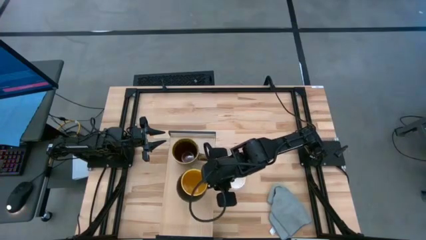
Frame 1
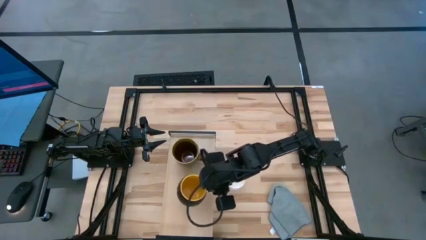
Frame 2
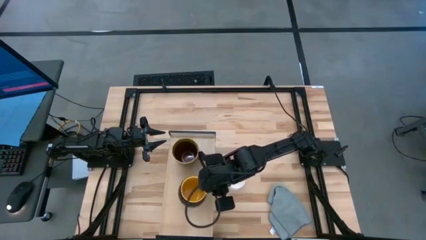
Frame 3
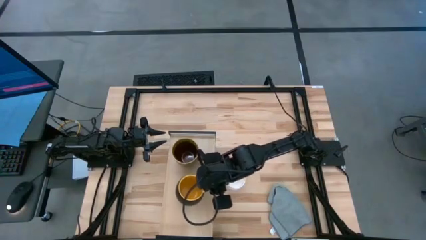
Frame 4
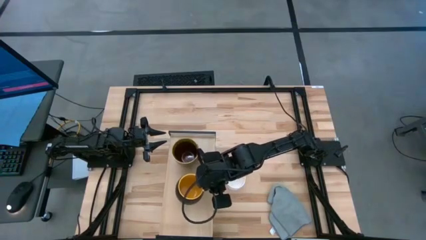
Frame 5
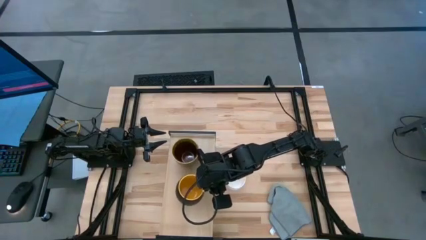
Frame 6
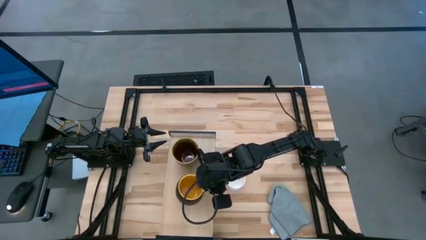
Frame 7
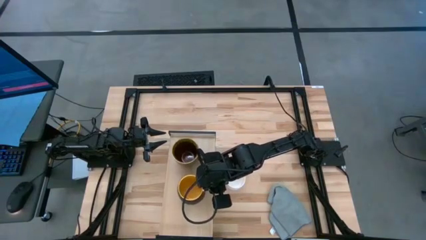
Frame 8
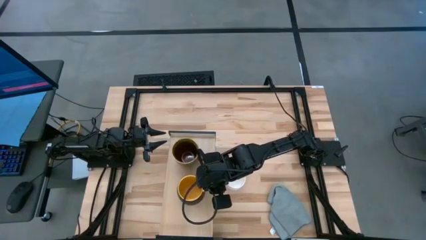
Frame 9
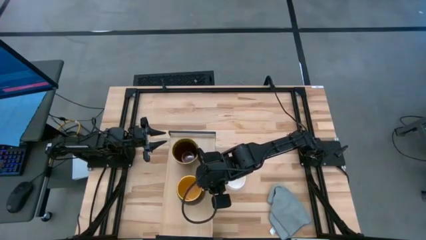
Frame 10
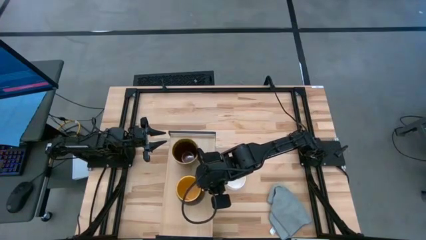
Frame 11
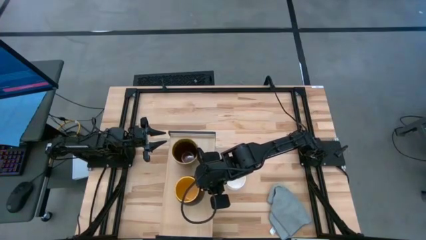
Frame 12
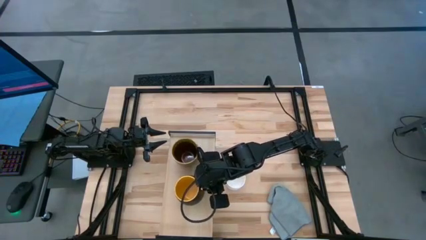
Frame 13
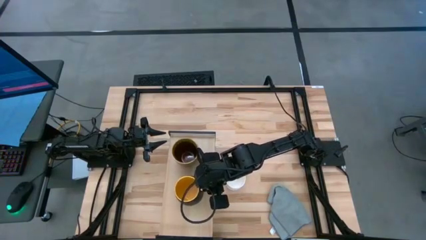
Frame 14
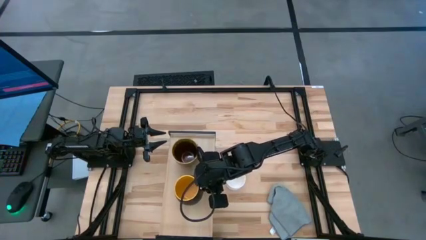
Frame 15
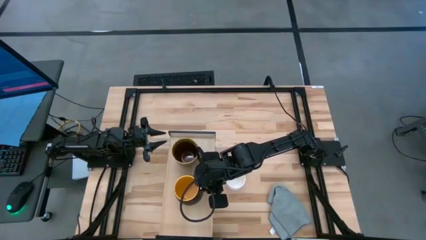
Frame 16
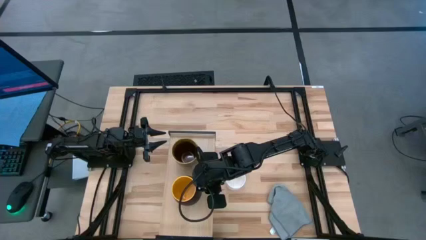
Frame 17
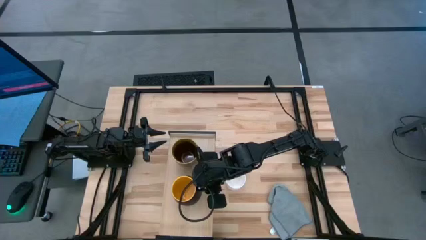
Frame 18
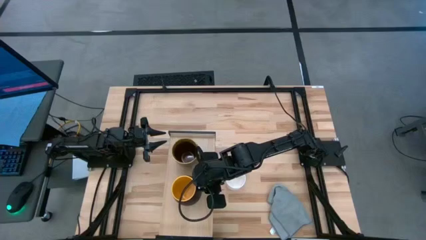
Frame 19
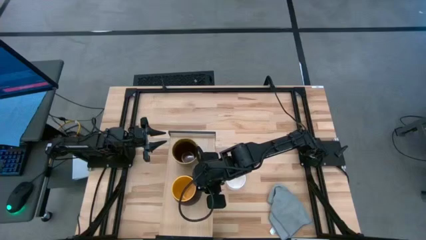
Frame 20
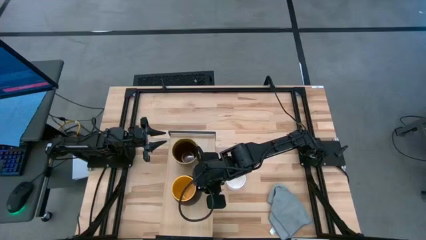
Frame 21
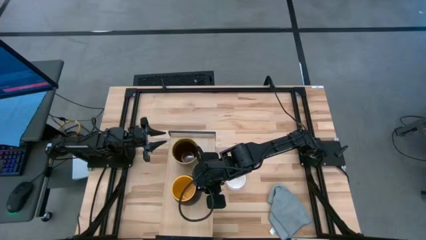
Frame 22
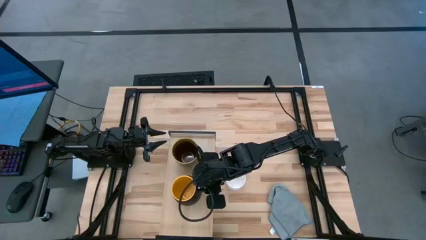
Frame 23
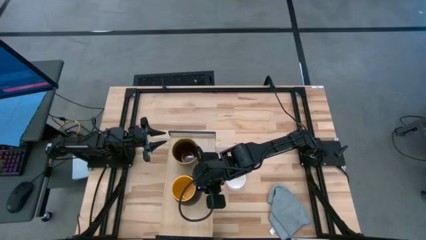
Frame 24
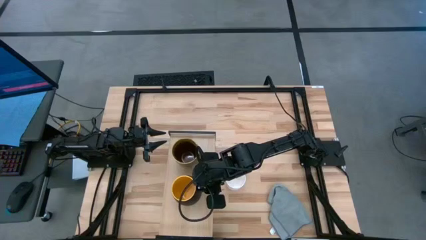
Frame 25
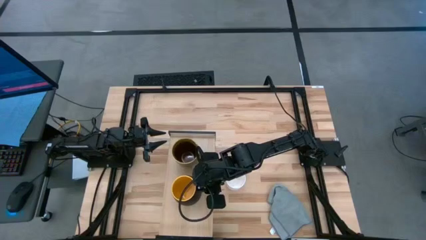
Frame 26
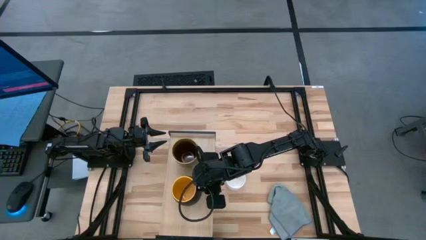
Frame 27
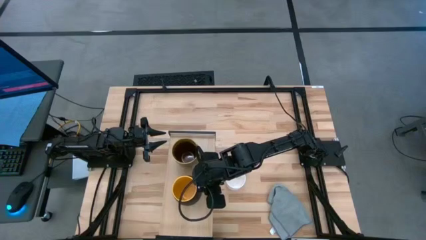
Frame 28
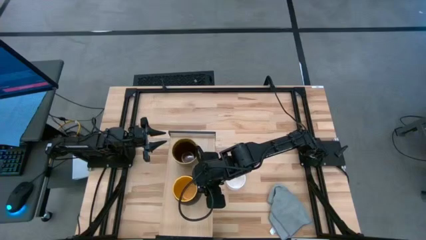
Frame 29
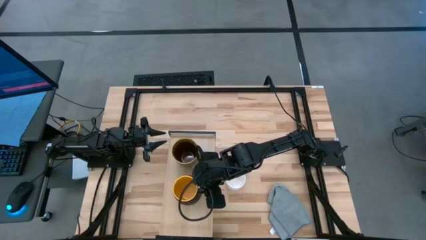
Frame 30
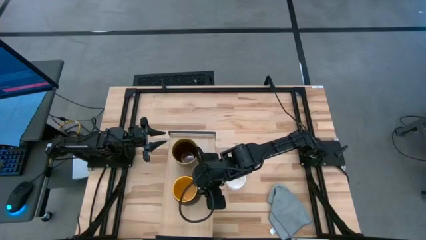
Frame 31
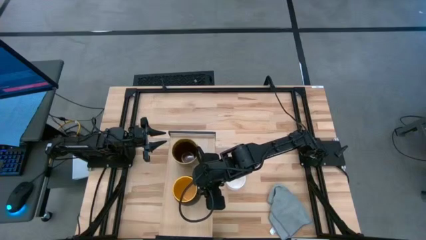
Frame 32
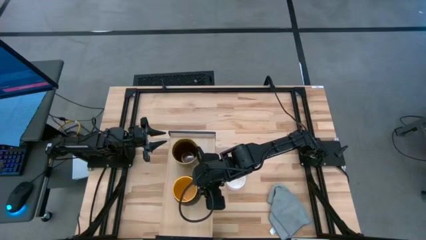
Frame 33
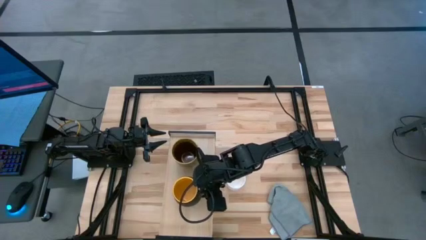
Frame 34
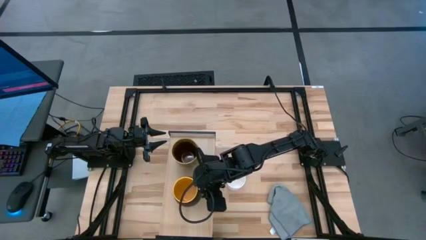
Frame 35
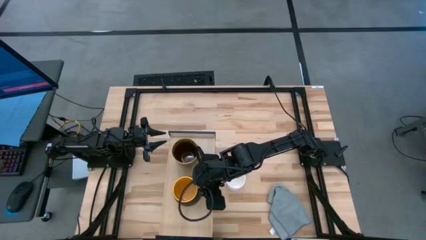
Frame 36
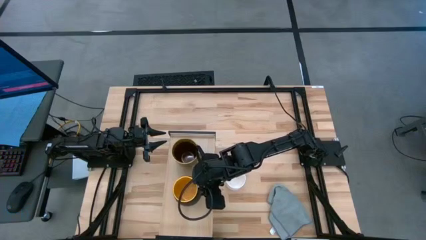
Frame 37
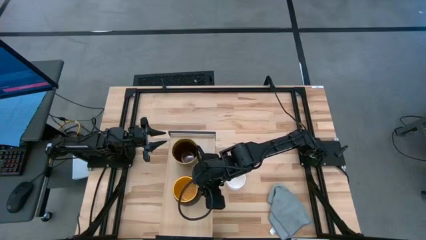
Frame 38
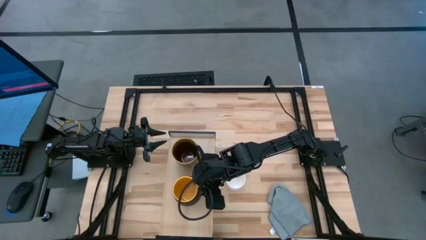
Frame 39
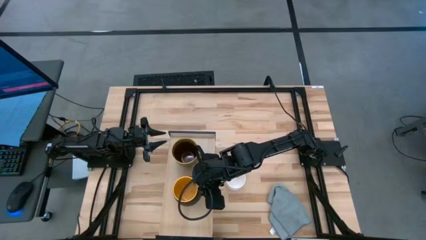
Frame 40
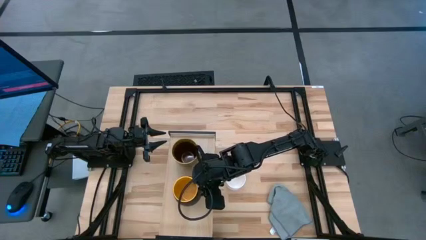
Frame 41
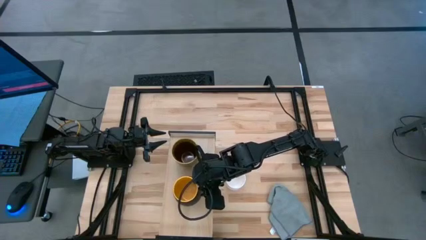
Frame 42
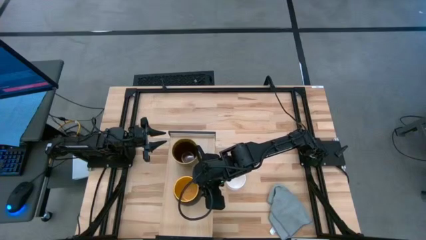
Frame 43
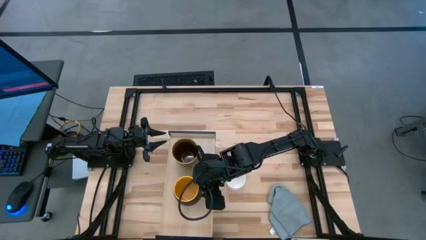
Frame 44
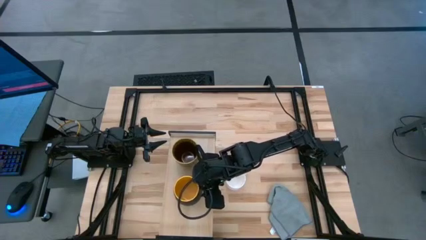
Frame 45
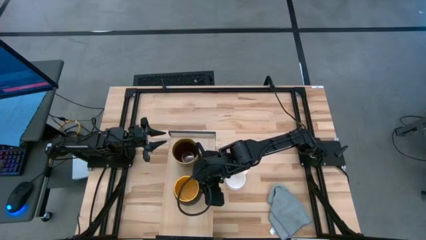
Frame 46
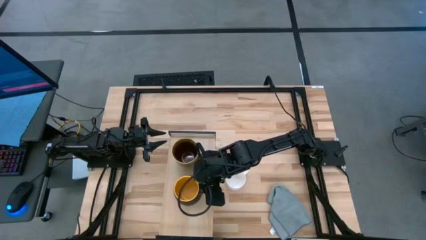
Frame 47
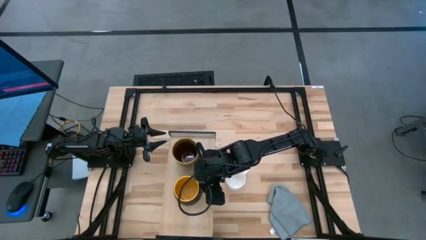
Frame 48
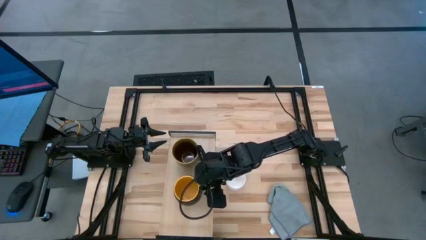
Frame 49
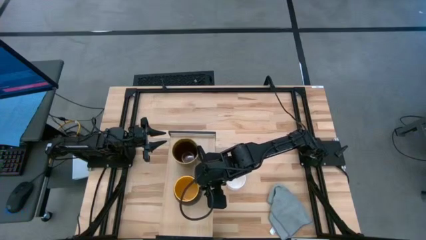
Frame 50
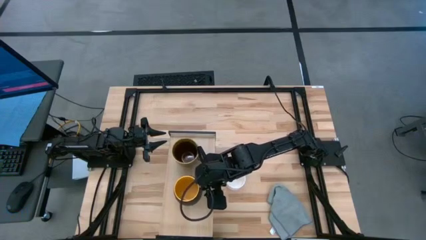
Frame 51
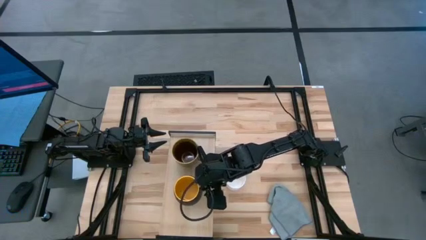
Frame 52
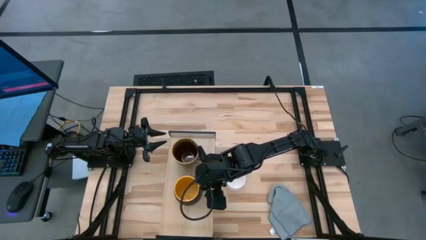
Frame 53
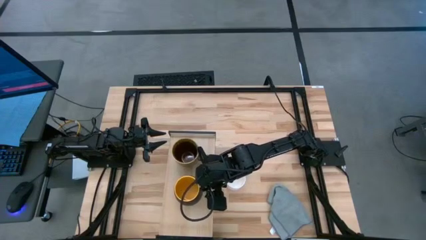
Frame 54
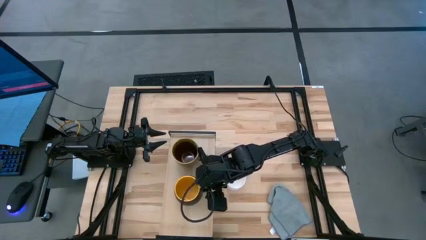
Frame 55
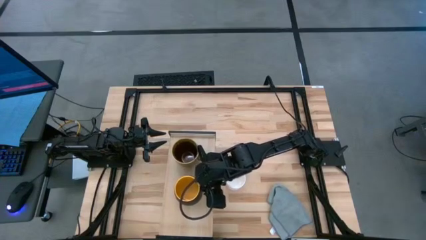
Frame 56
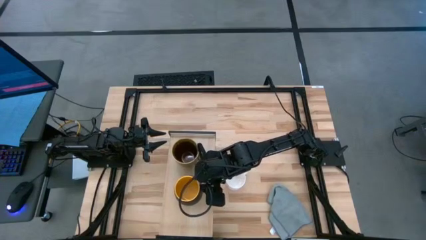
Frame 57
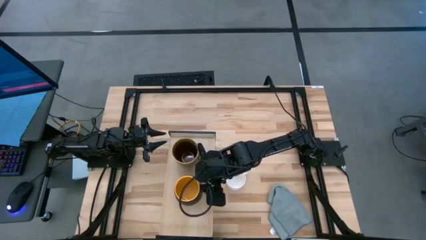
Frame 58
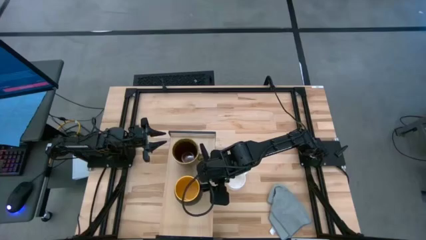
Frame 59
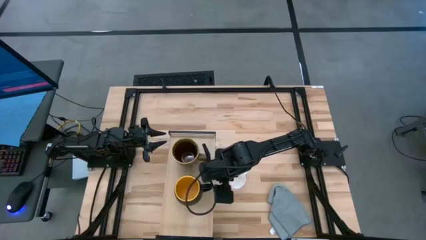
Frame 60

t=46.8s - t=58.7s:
Task: Stack small to large cups/mugs on shelf
Put the black mug on the shelf

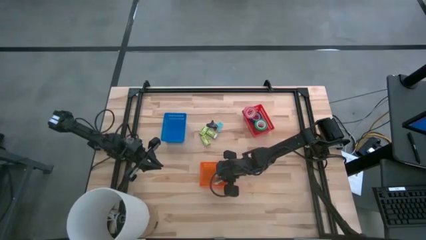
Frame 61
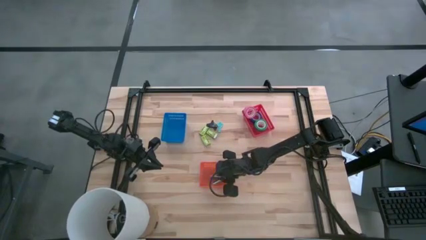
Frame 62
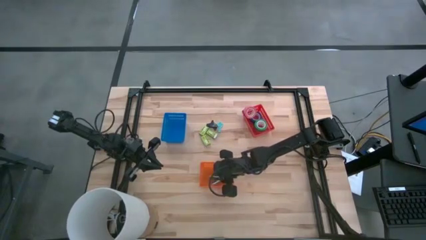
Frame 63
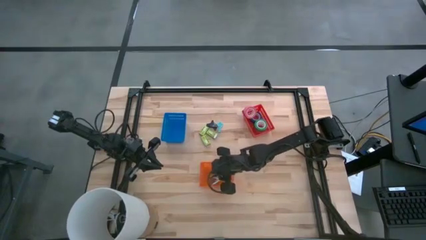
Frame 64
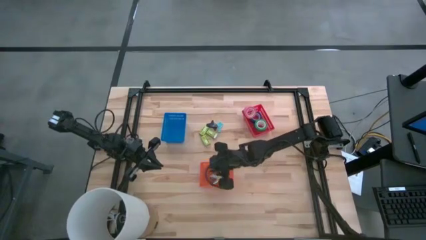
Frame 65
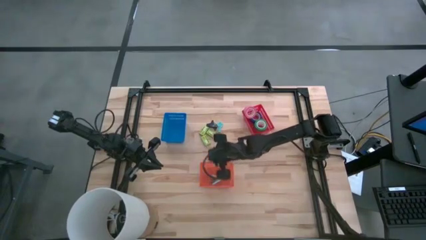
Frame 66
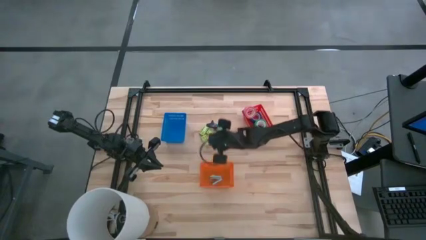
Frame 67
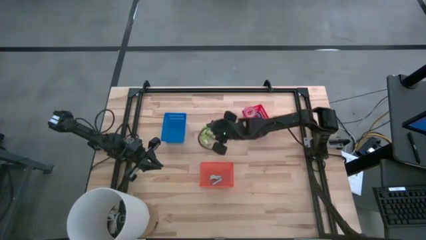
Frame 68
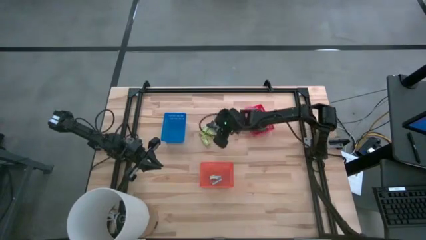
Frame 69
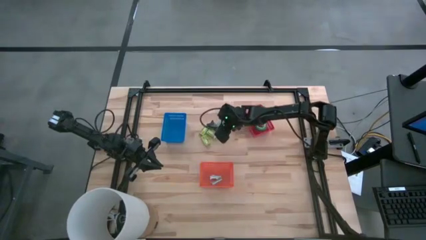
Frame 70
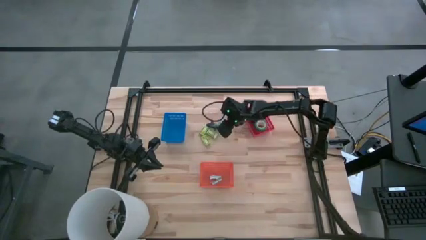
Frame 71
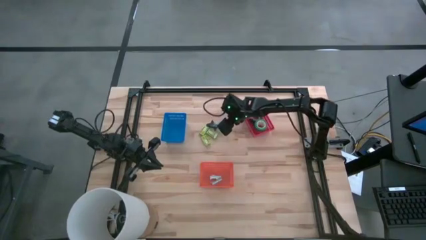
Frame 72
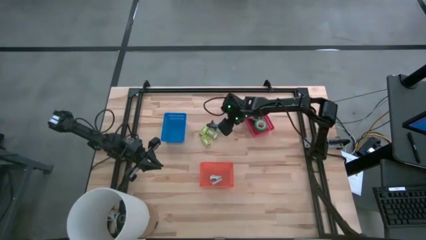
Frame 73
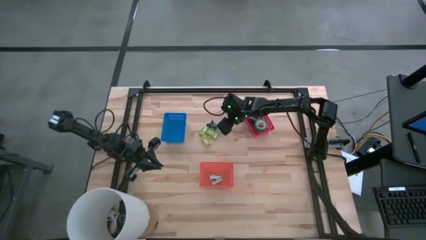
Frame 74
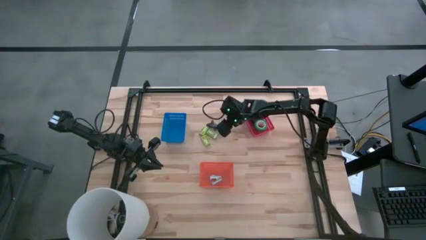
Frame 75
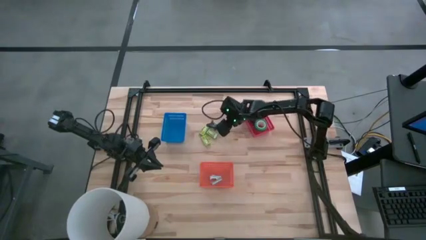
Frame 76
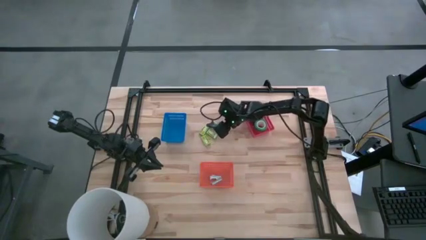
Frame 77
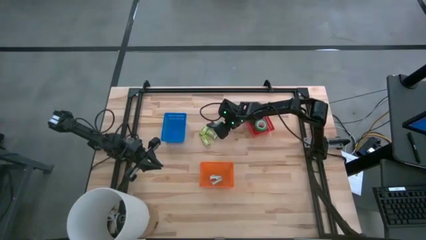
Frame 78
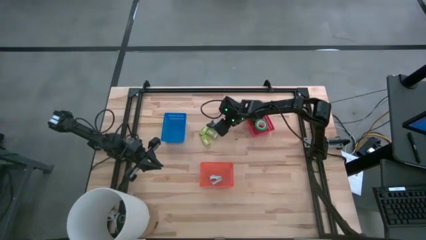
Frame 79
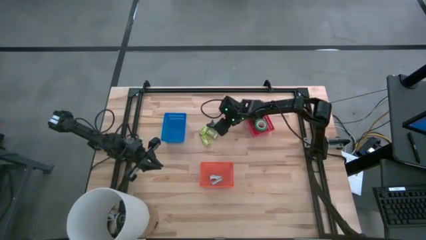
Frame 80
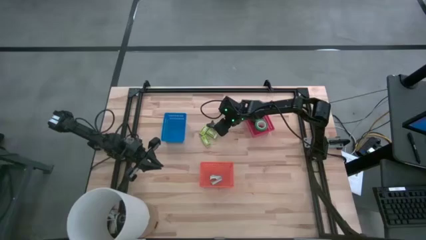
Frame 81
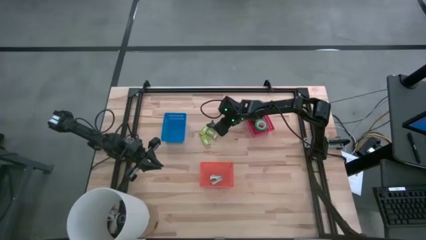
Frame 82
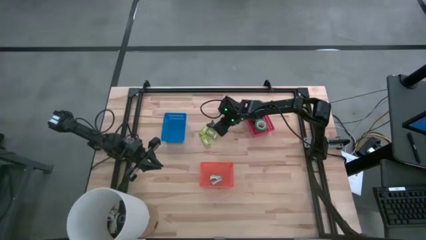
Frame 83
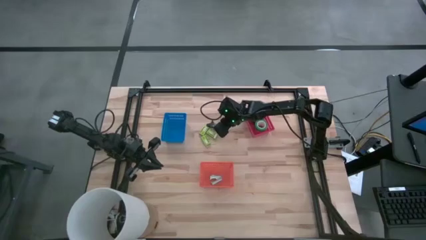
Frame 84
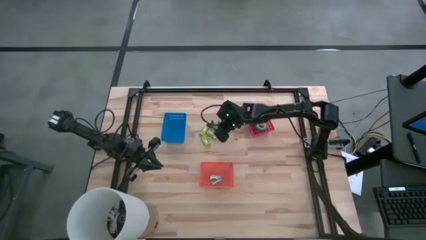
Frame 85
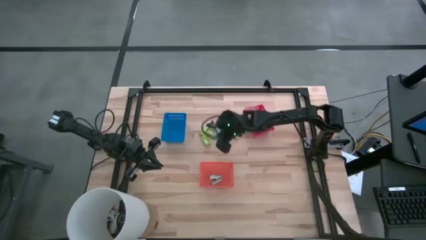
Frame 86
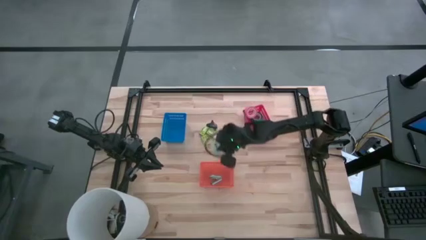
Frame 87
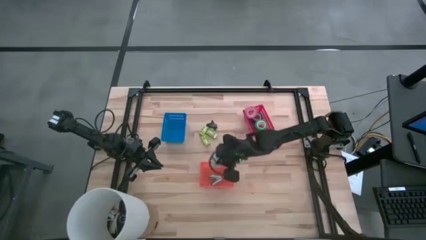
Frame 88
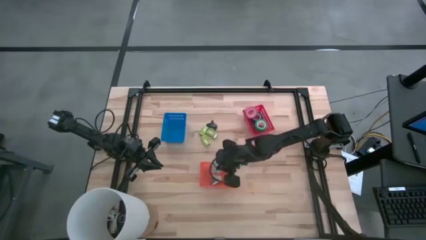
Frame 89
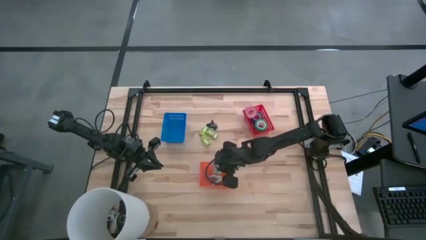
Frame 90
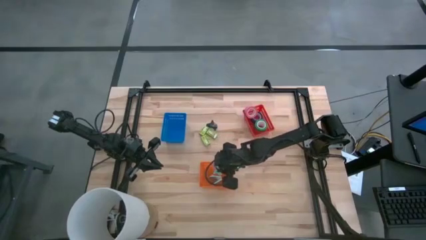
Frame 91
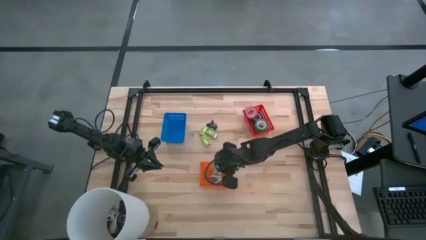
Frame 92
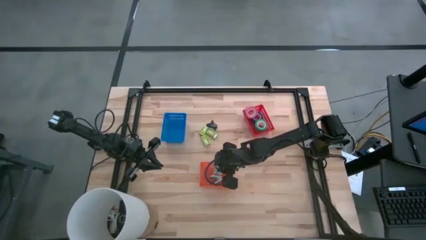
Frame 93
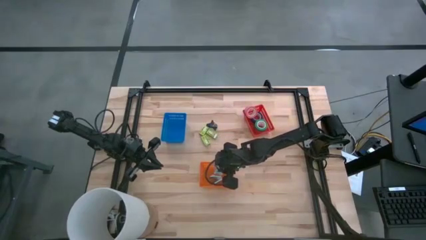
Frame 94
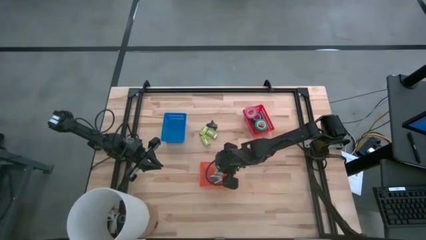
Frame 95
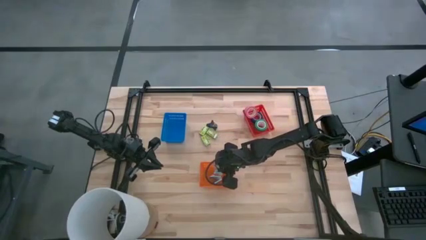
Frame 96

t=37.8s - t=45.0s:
Task: Pick and place Stapler, Stapler remover, tape
Put the blue stapler remover into the orange basket
